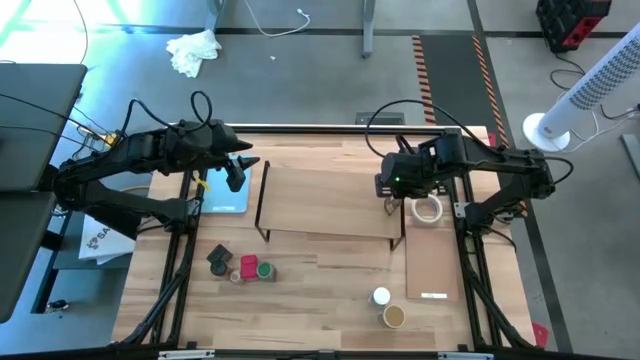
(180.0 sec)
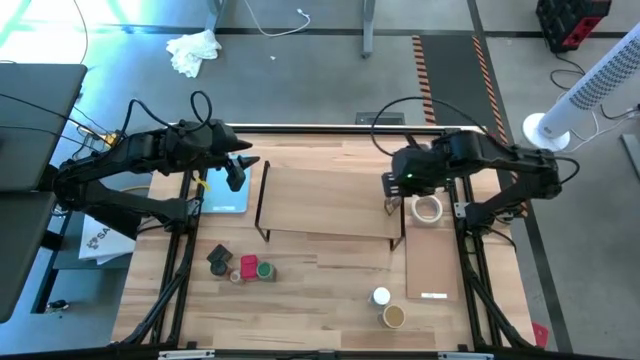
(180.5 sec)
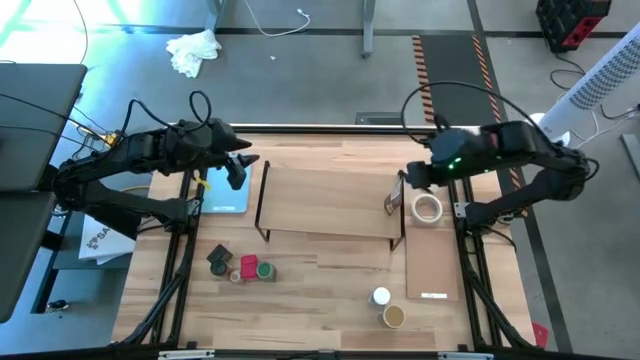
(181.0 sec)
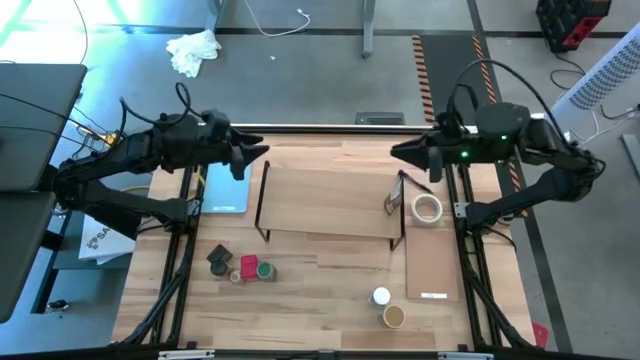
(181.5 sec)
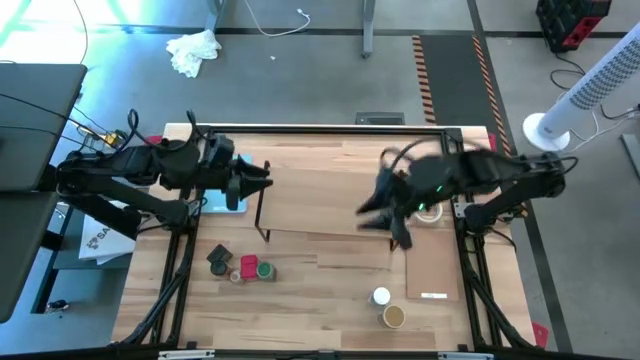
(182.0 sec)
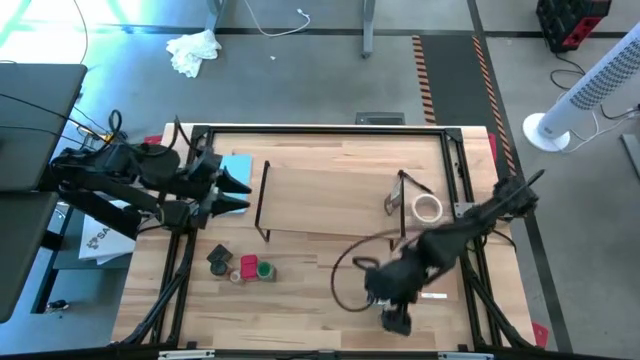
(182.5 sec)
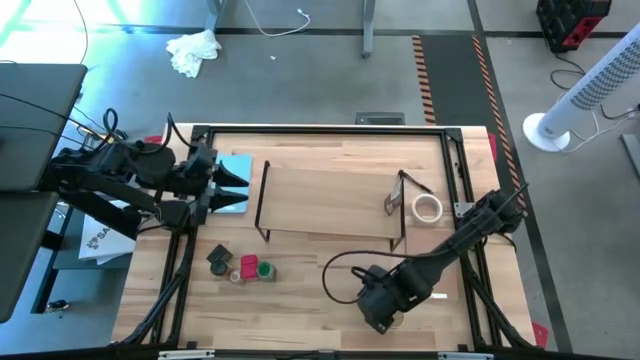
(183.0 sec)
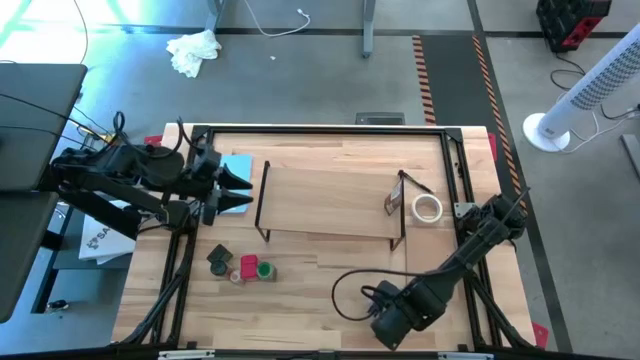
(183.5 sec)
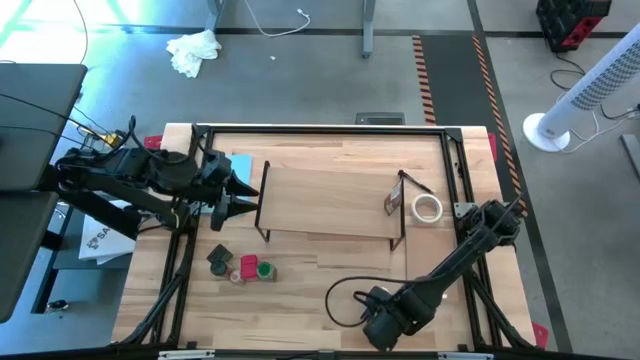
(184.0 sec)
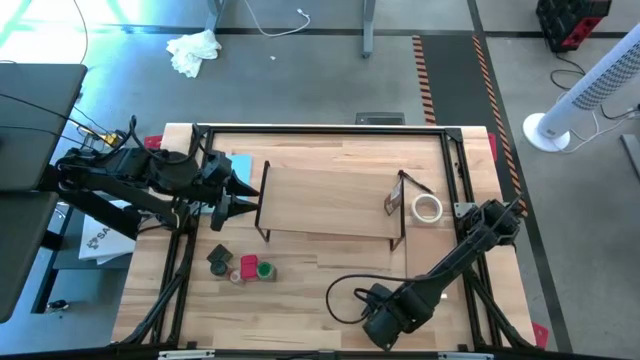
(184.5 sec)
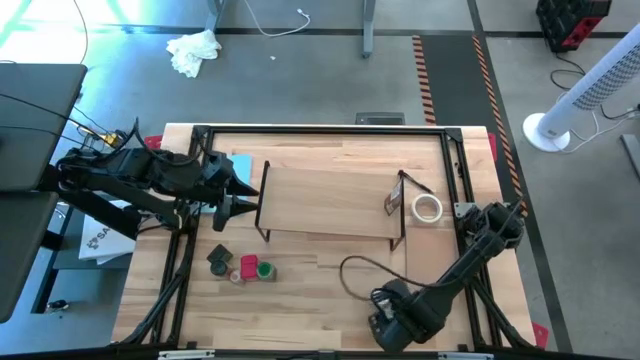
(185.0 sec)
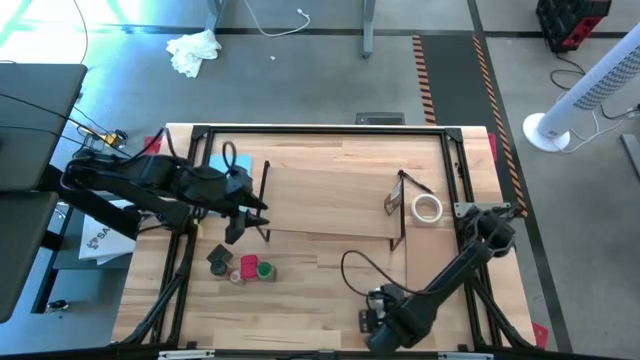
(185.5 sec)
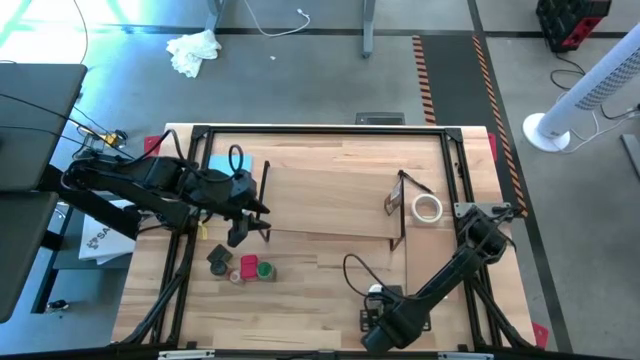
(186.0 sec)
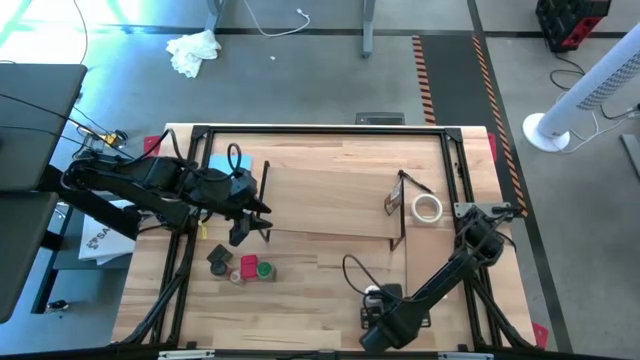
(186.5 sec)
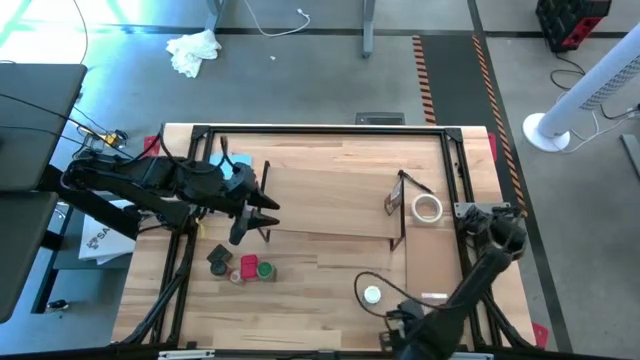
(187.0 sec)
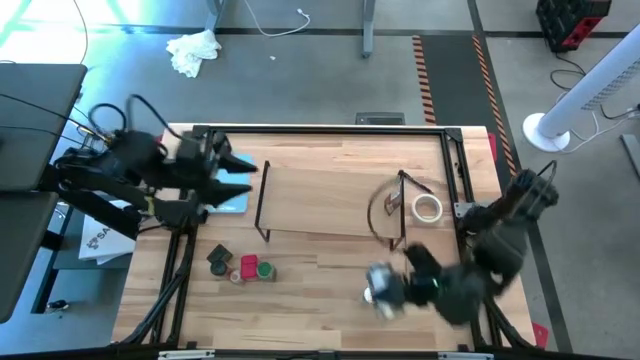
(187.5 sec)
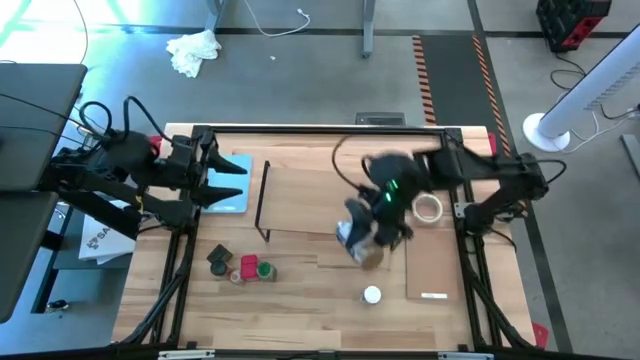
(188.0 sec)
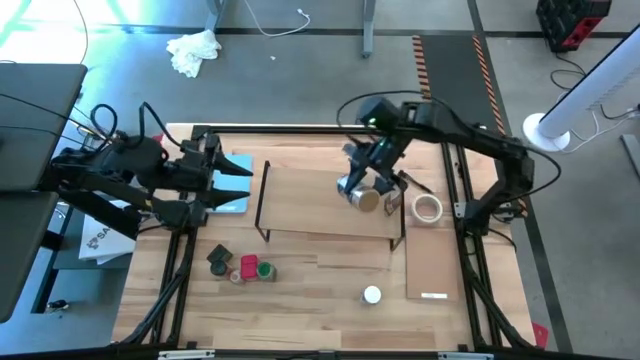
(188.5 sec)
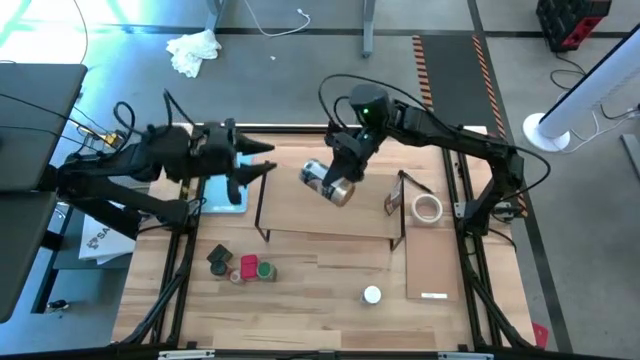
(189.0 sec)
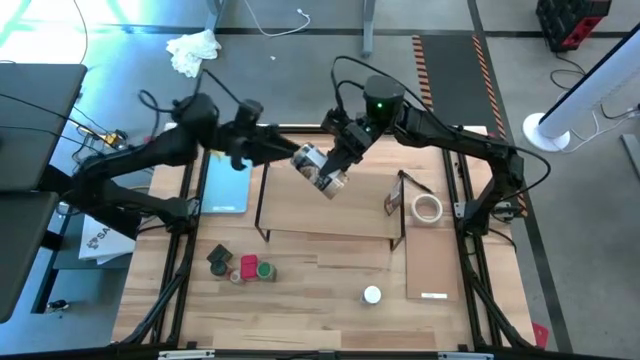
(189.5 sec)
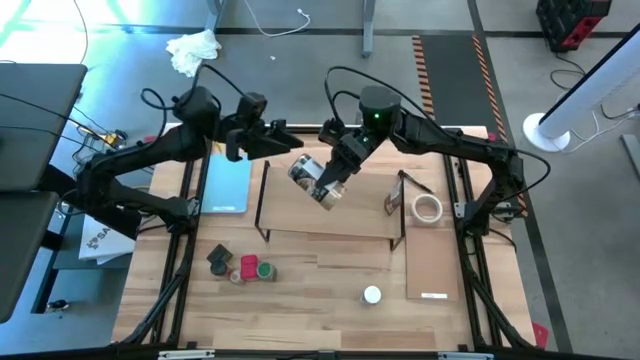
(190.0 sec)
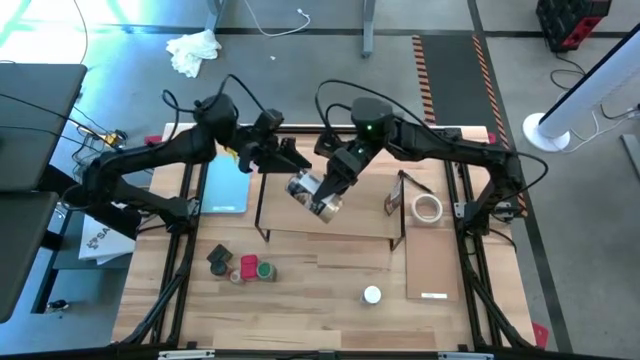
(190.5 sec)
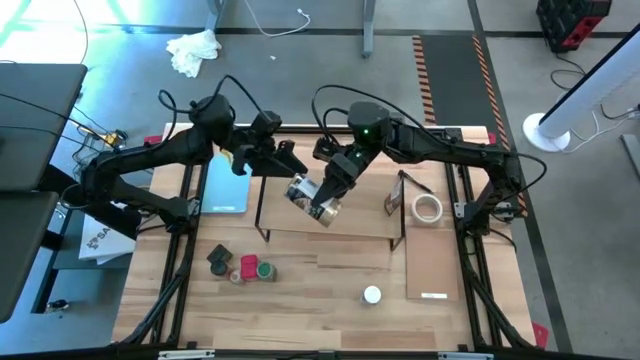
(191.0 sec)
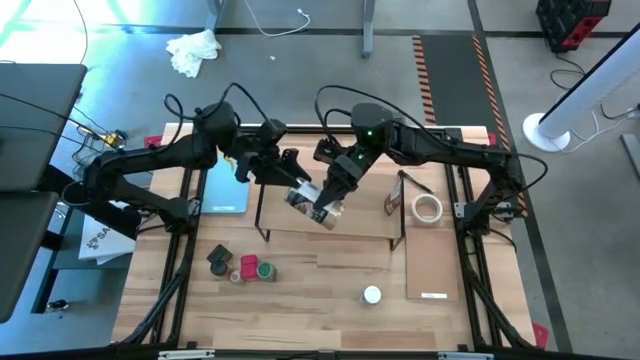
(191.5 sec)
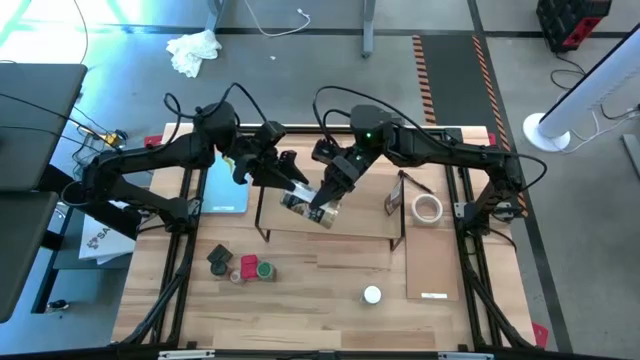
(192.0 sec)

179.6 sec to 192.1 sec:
Task: Shelf spices
Put the brown seasoning bottle on the shelf
